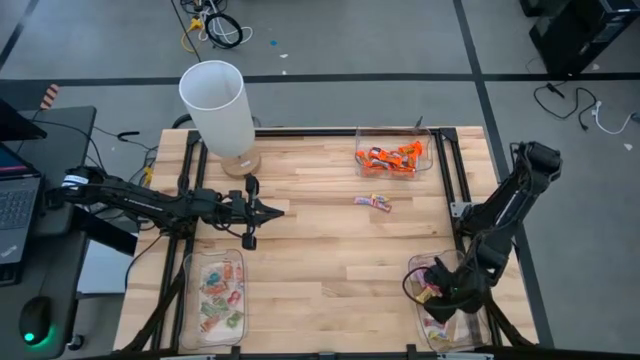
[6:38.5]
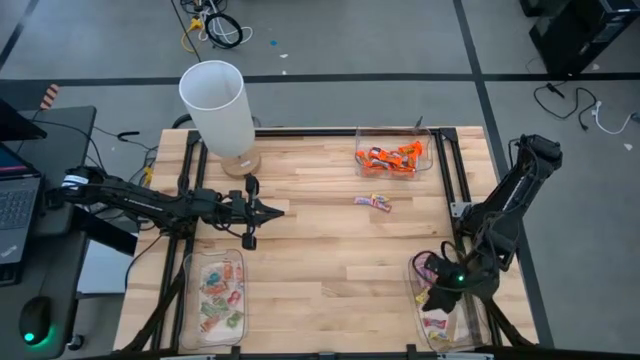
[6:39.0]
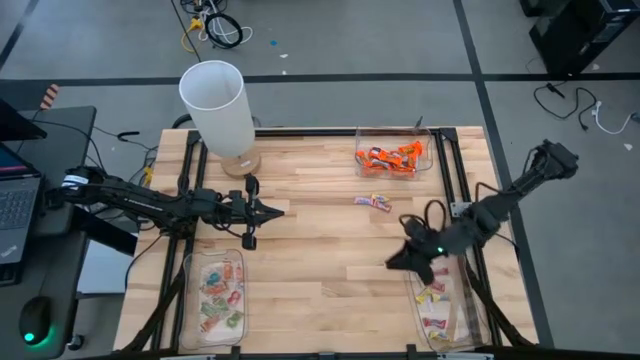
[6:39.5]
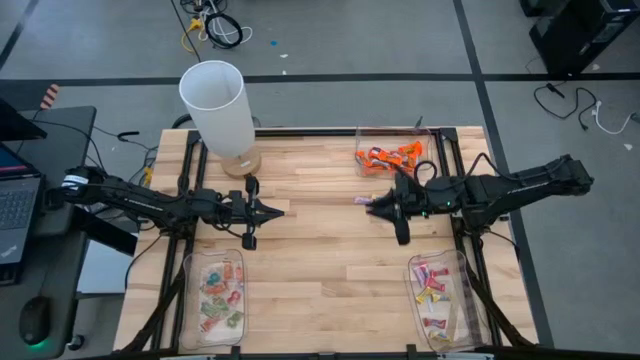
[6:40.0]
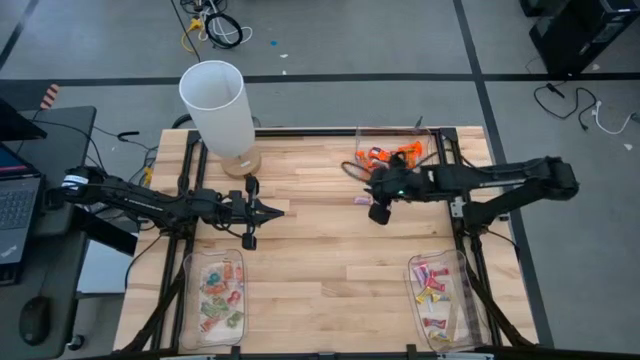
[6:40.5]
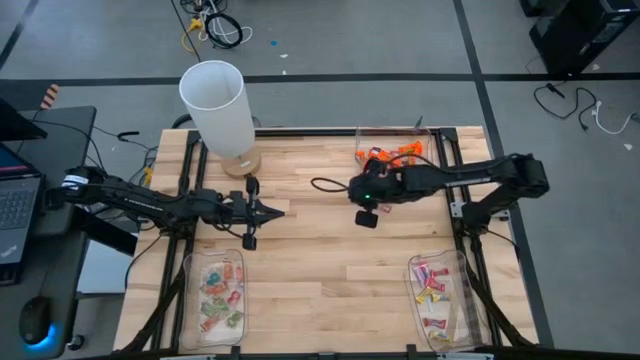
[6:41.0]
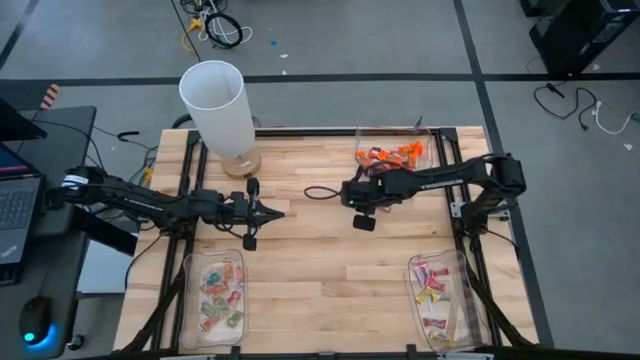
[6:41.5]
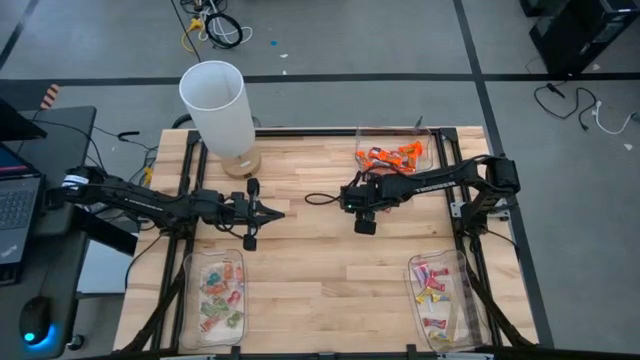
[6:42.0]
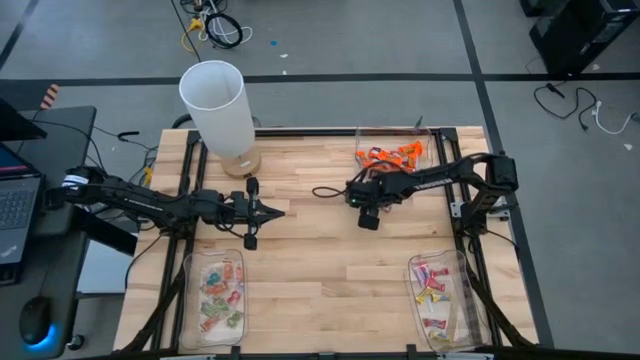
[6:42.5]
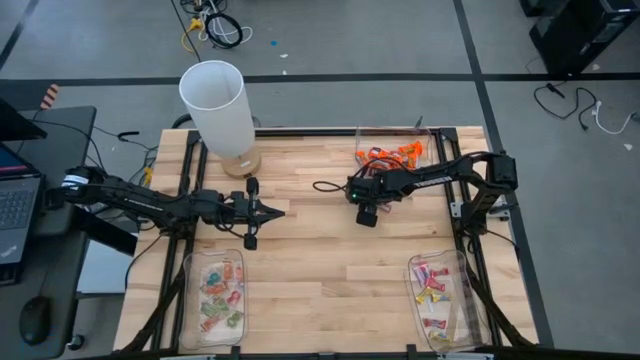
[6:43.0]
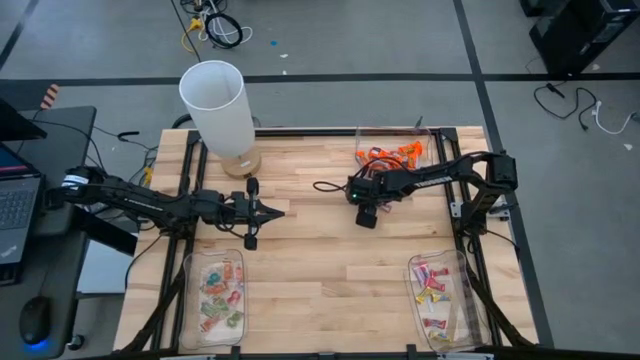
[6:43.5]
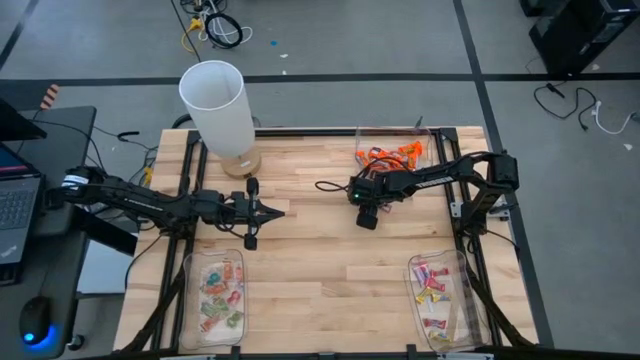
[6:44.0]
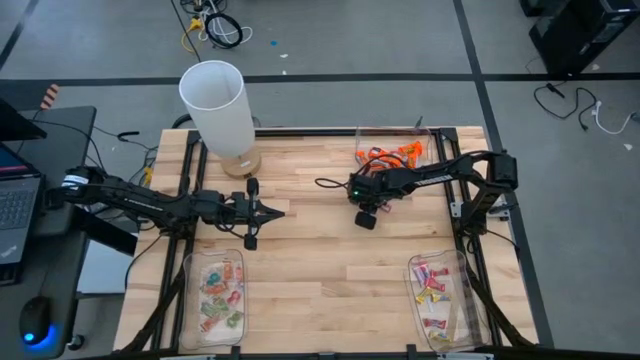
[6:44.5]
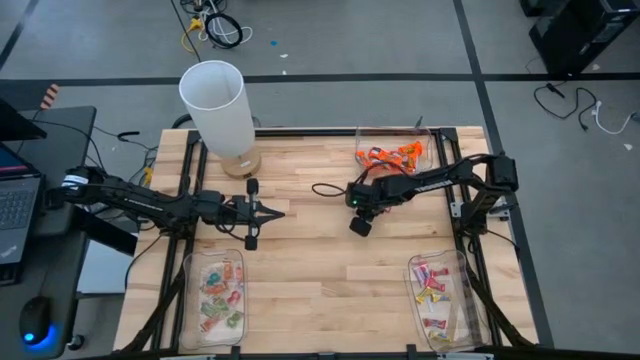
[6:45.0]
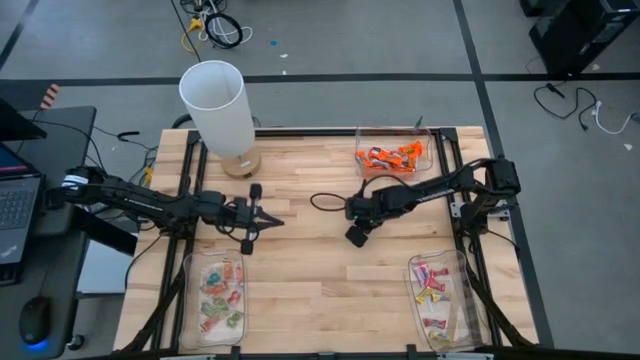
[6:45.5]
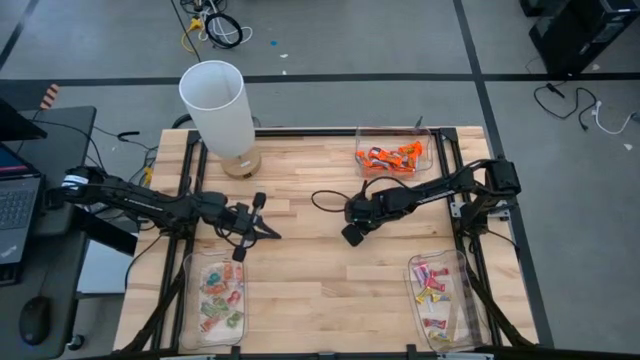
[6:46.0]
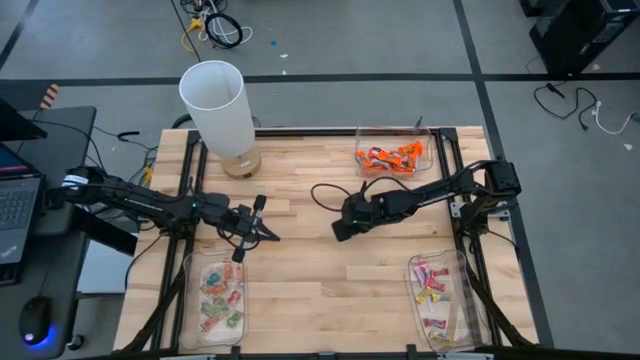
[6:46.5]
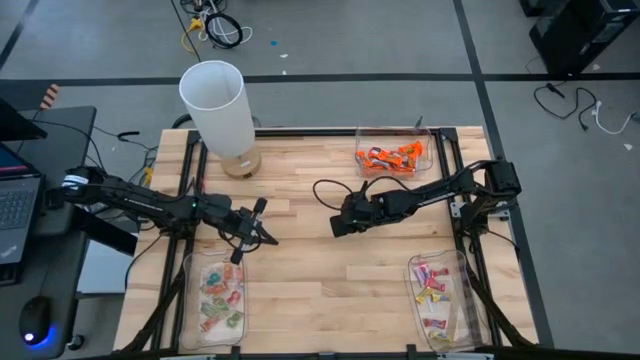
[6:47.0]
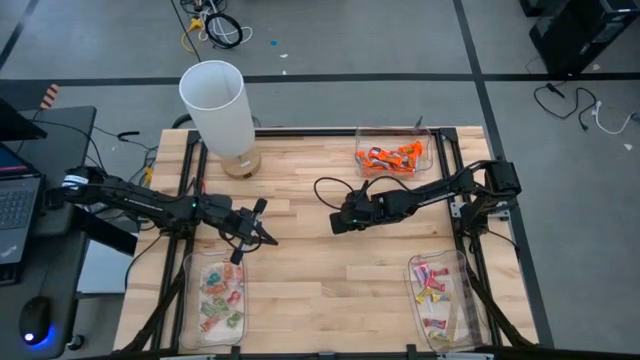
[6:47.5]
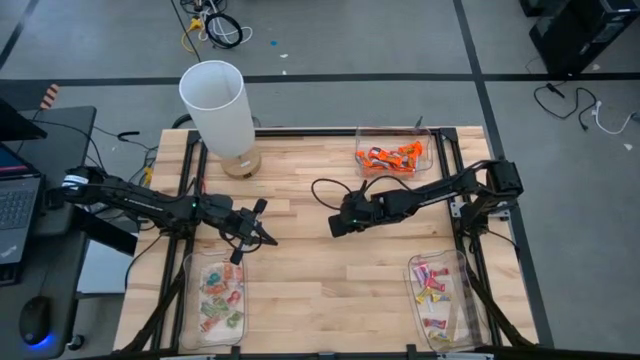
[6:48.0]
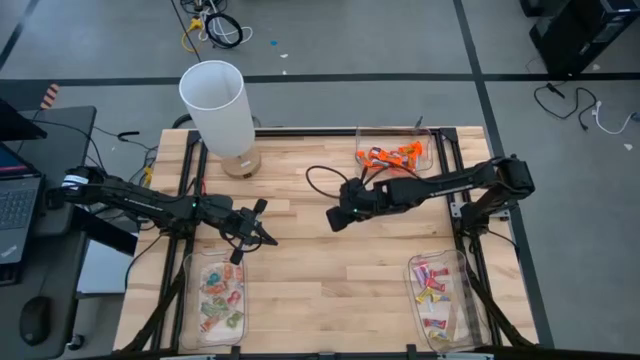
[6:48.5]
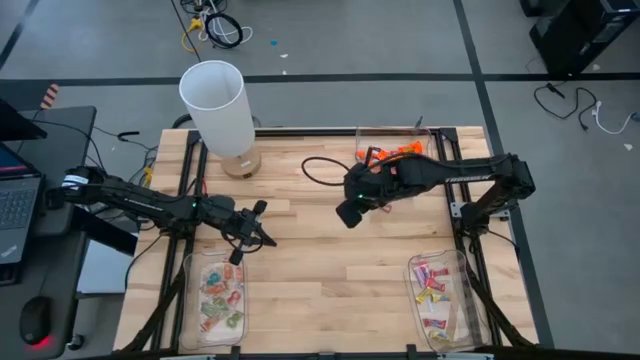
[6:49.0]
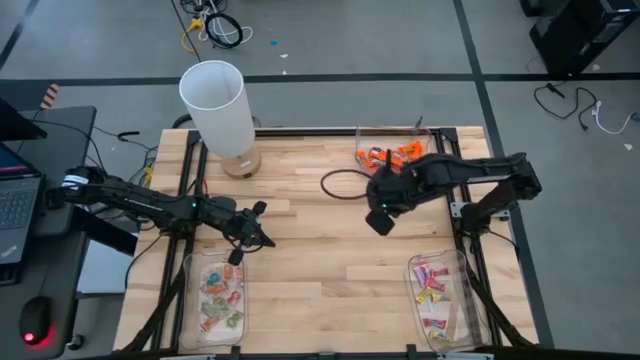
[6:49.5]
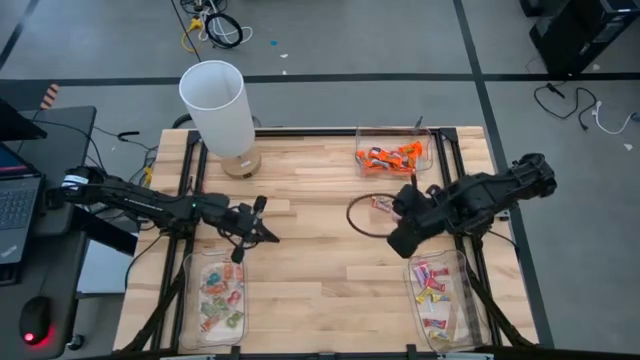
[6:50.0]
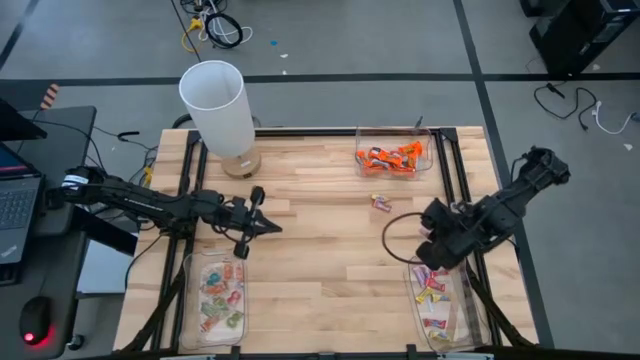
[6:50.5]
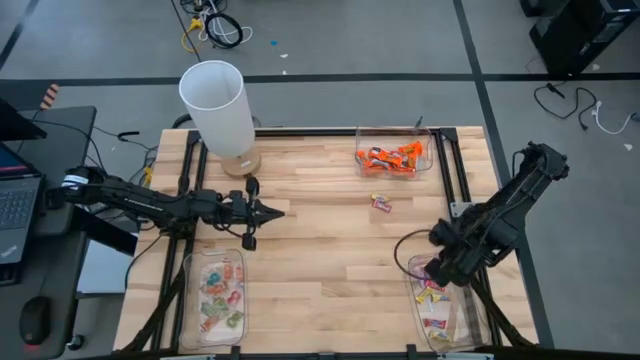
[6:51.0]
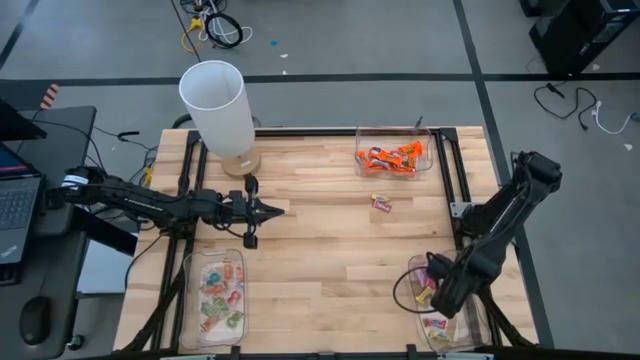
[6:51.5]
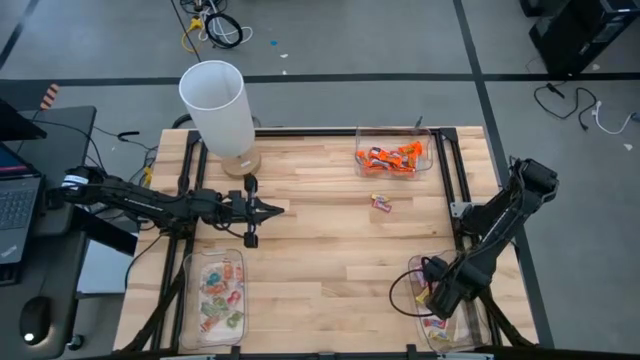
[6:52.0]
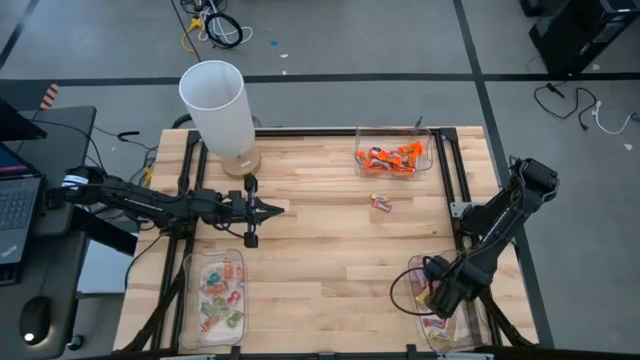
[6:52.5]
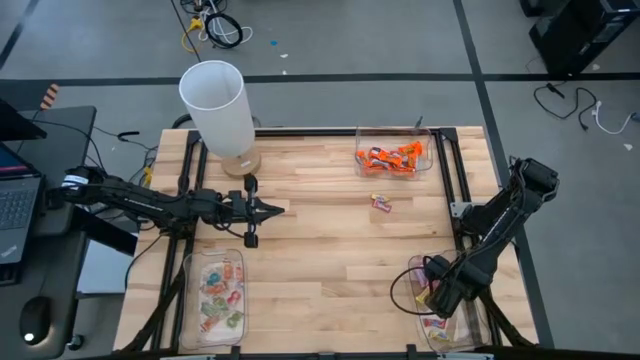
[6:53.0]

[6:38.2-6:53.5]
Task: Sort candy
Put the pink candy into the bottom right transparent bin

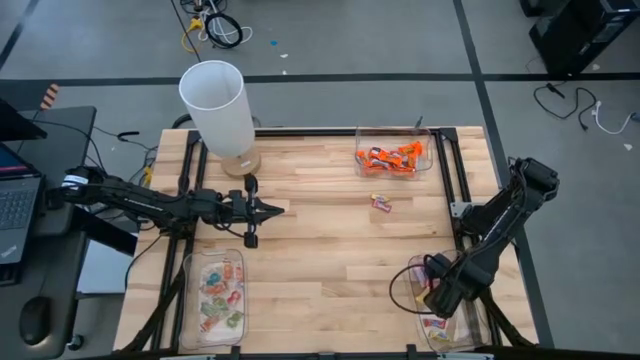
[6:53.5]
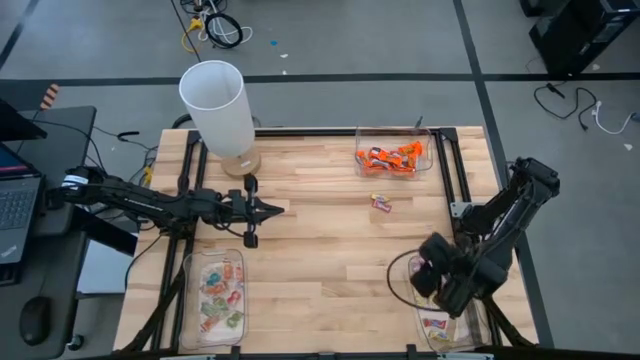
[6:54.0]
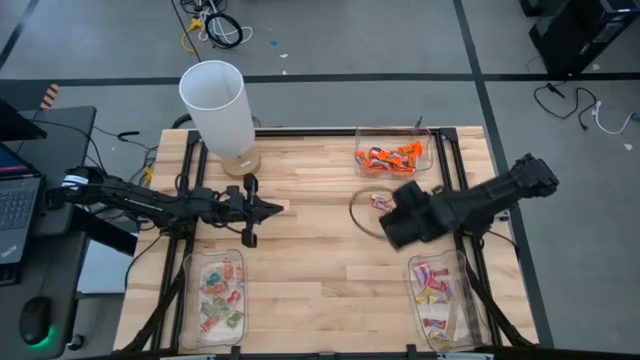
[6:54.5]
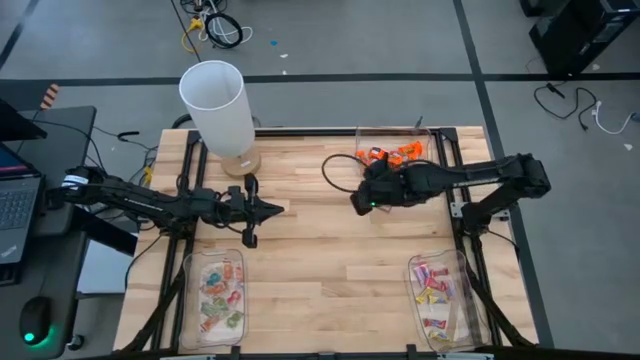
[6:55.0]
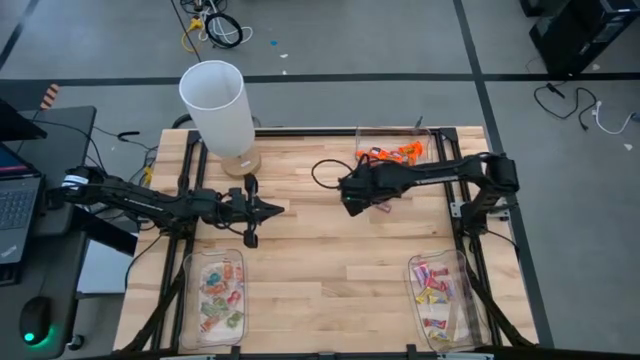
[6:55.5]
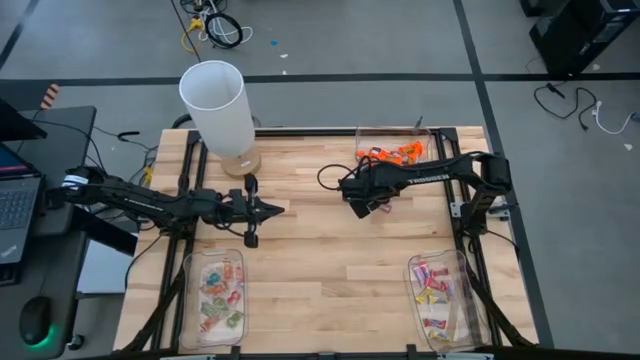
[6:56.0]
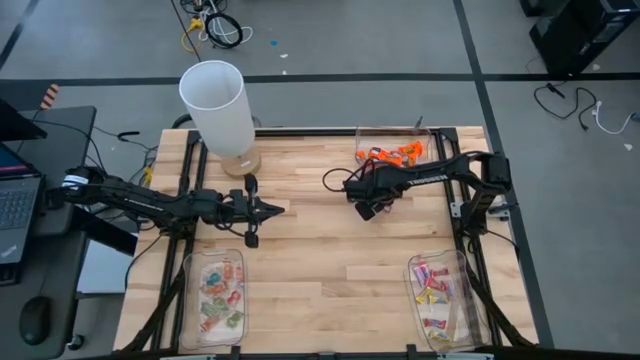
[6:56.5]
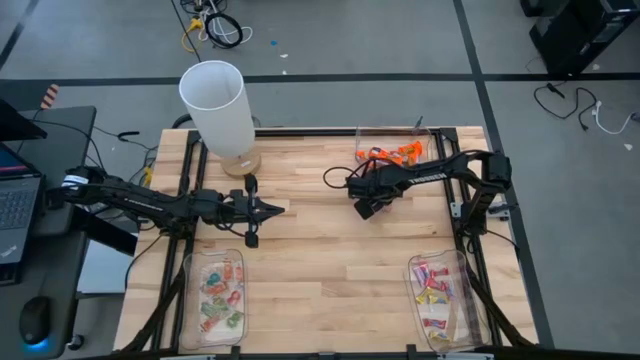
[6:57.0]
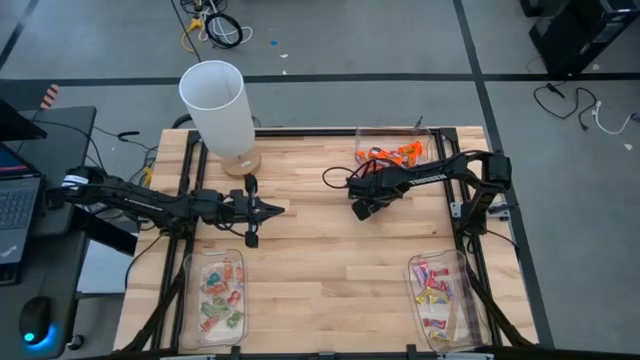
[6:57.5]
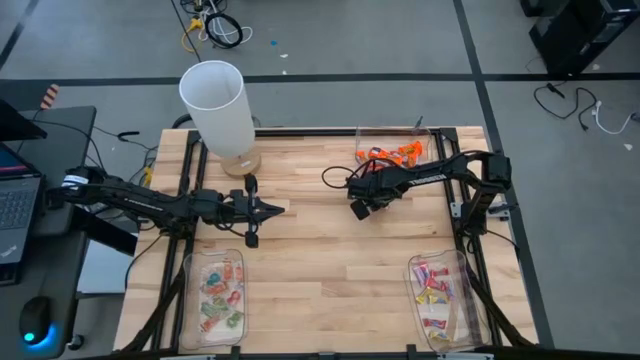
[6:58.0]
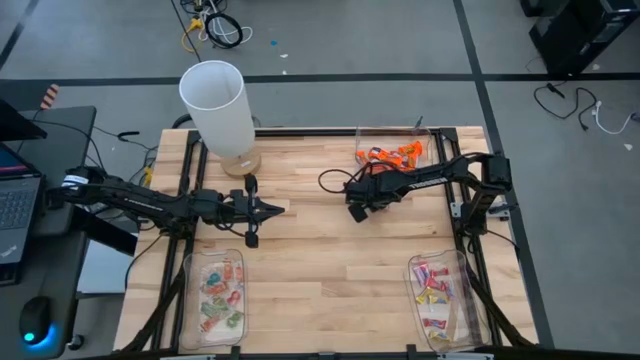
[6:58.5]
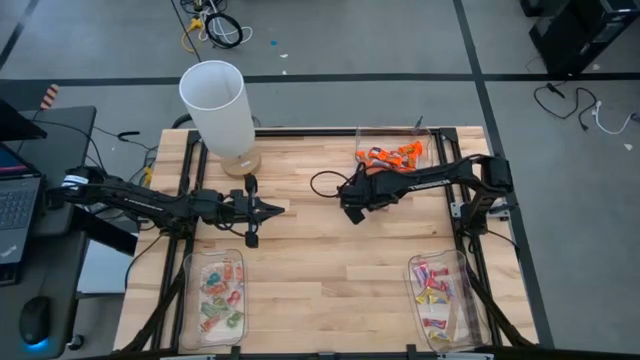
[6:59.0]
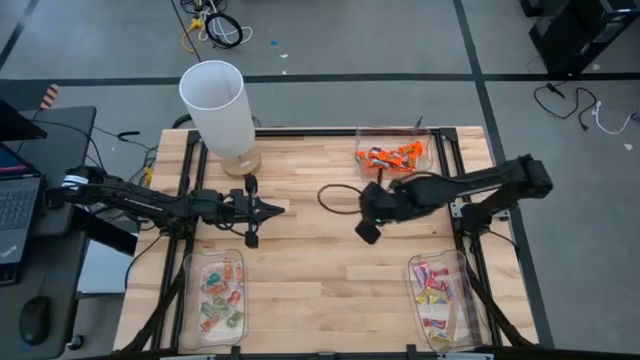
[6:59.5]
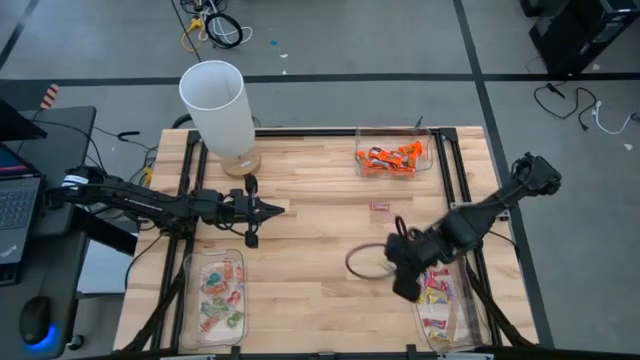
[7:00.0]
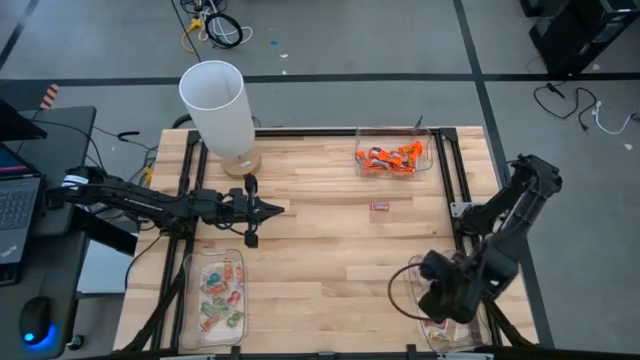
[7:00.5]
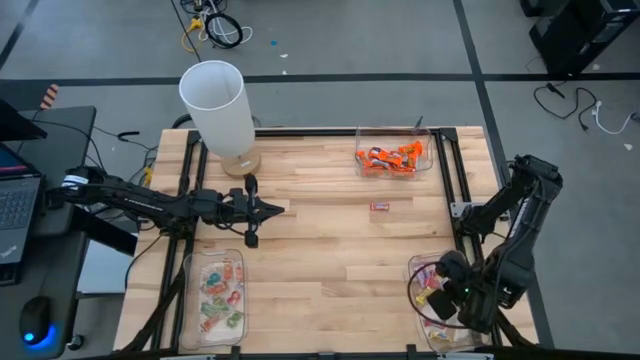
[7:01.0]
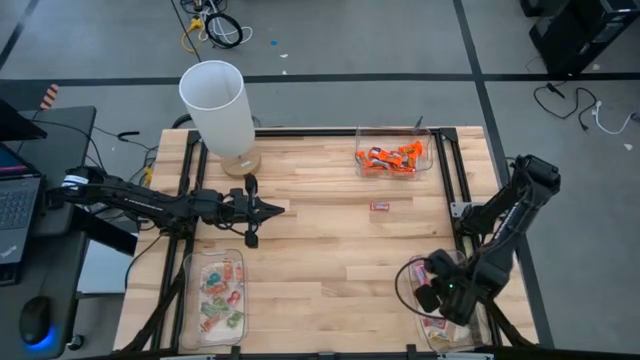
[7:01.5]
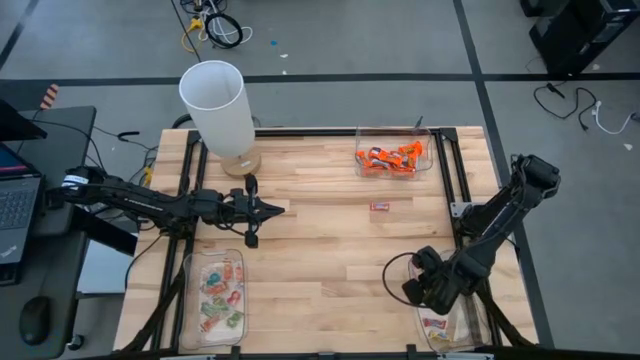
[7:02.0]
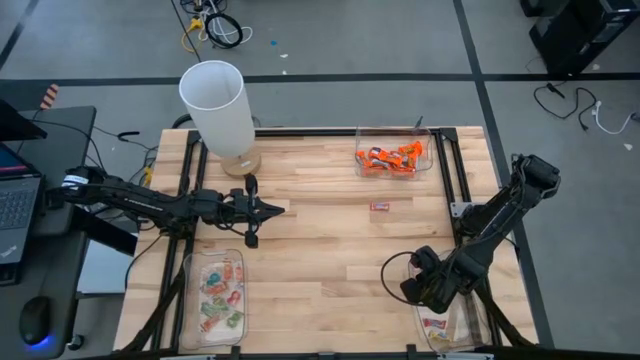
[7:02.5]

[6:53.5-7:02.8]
Put the yellow candy into the bottom right transparent bin
